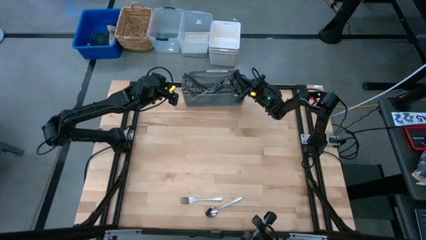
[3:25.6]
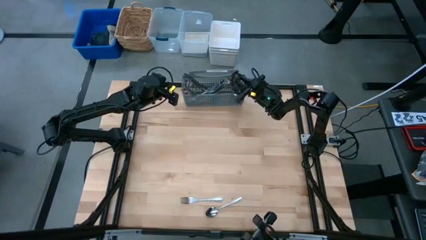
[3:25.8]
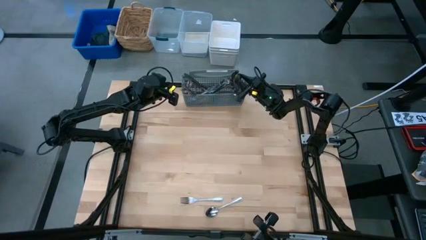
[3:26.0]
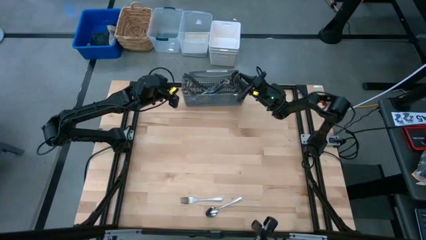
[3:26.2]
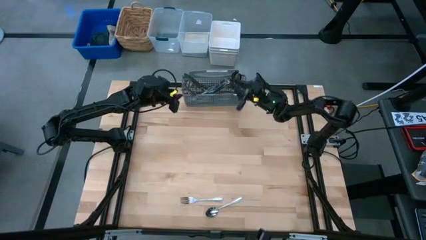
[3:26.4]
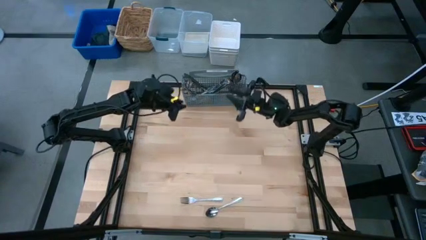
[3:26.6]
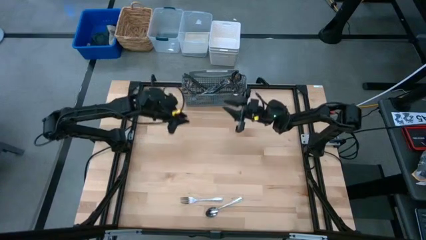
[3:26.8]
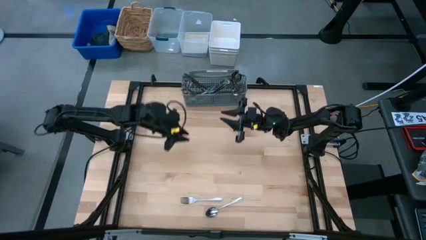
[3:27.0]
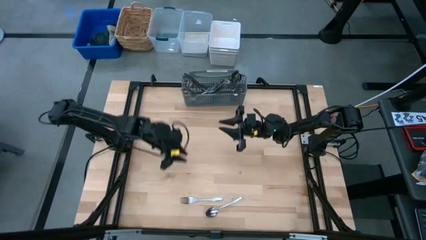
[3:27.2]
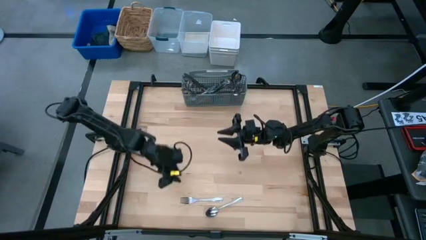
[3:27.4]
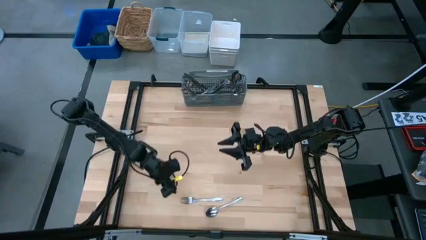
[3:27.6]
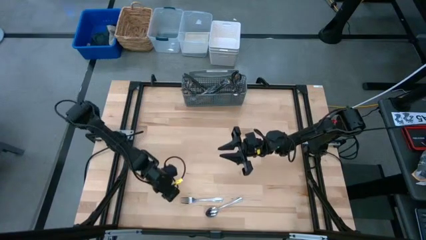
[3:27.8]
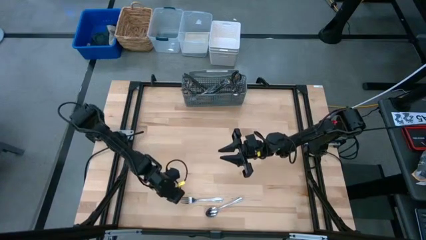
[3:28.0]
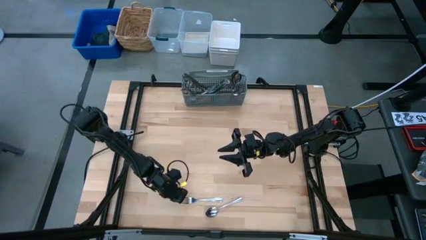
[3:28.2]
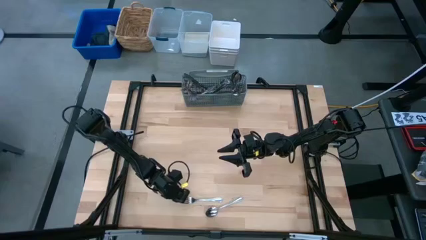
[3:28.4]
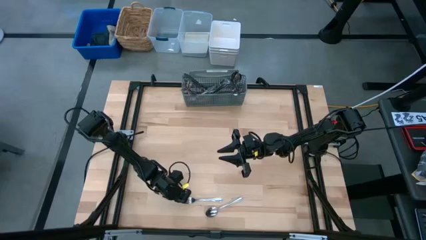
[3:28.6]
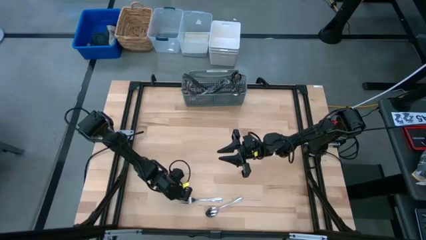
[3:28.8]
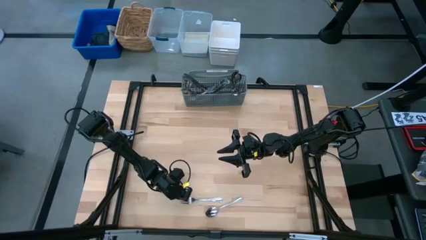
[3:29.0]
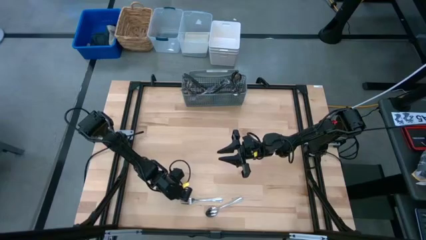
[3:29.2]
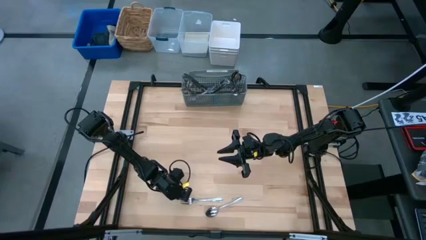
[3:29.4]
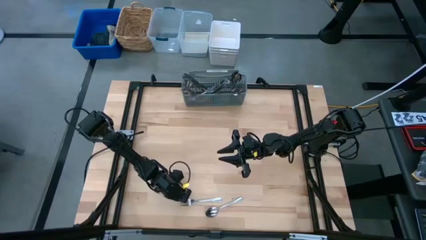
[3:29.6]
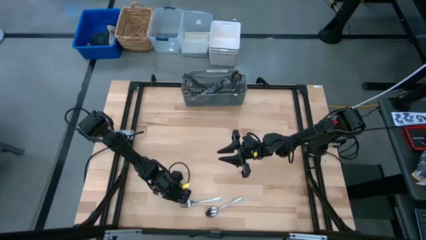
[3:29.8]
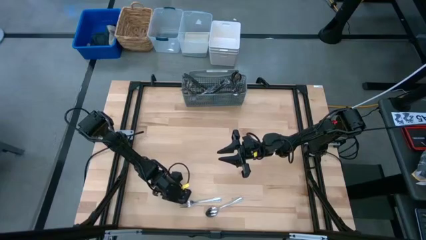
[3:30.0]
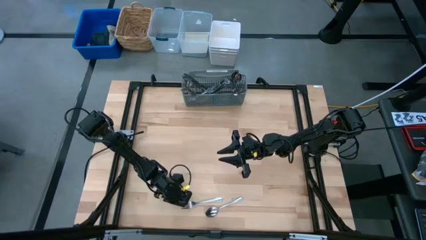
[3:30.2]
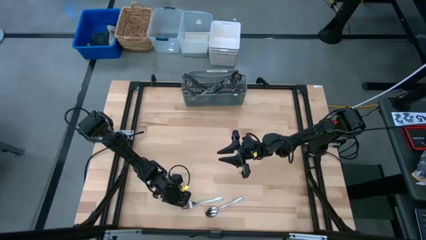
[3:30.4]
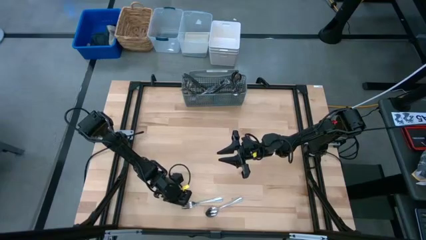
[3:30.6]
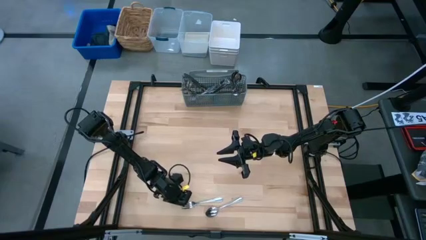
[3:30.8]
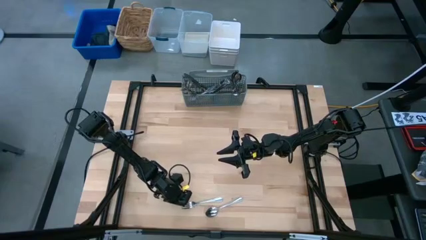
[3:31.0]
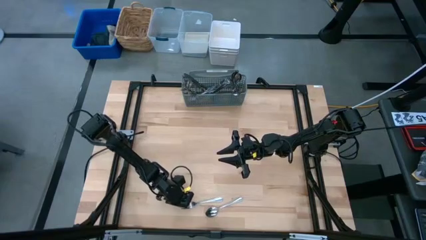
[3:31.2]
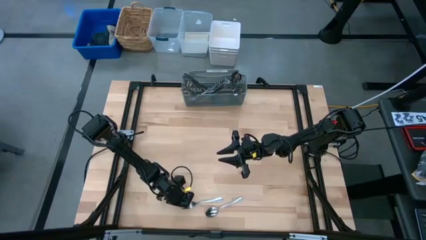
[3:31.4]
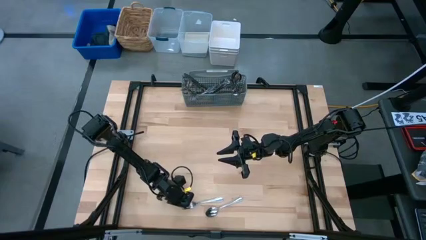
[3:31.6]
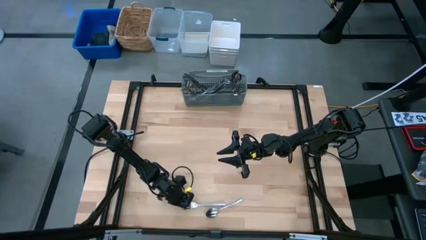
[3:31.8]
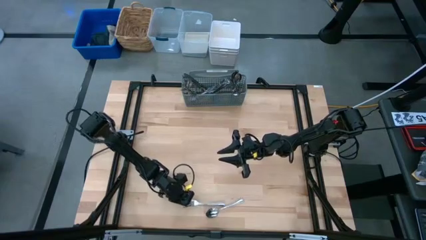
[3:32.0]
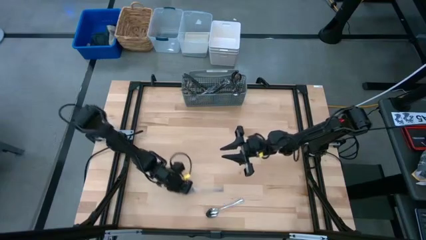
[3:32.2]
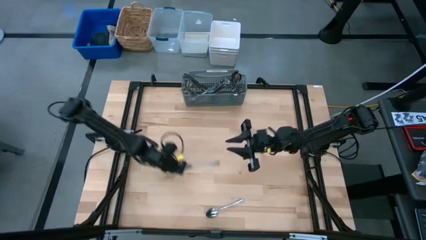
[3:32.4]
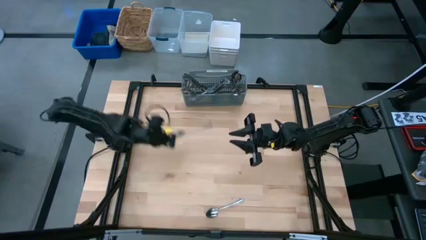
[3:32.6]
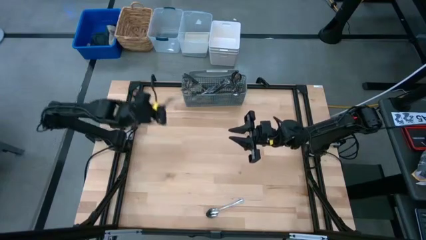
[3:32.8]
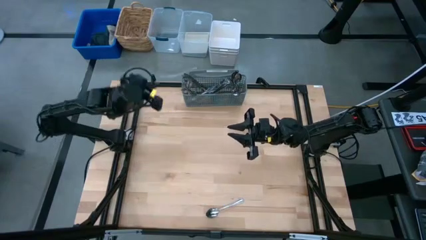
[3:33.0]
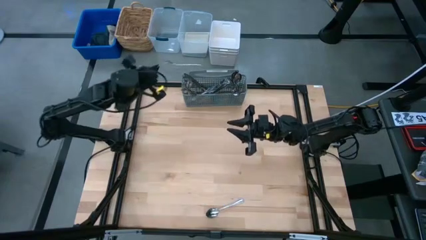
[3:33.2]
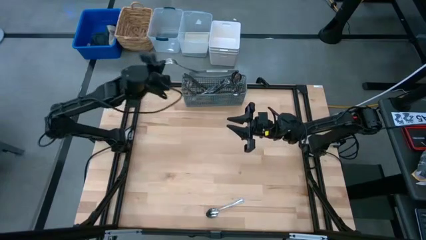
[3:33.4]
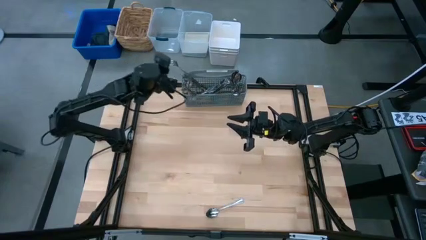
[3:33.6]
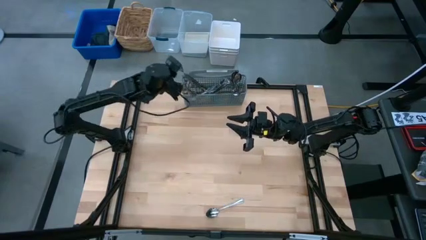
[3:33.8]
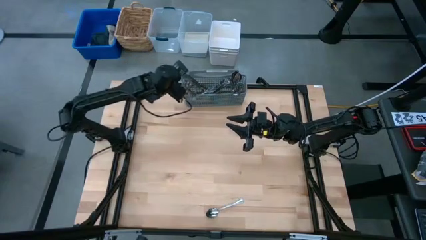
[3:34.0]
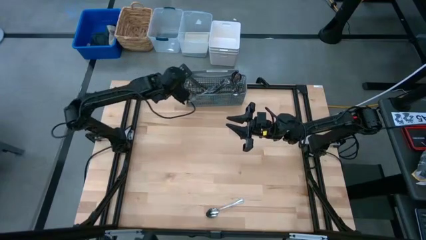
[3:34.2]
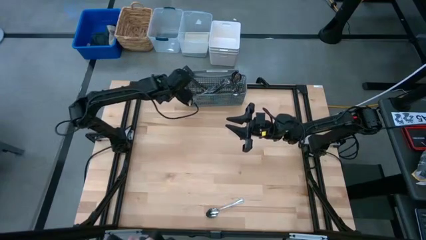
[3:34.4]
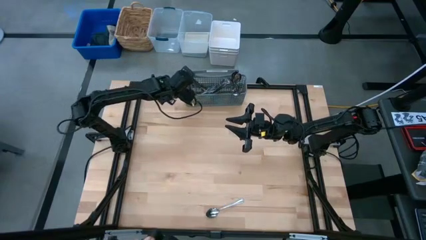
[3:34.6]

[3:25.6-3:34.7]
Put the silver fork into the dishwasher utensil holder

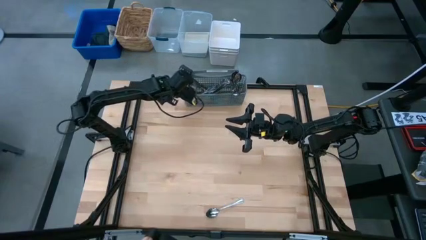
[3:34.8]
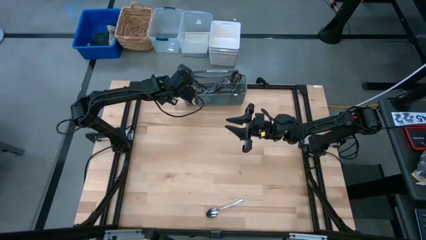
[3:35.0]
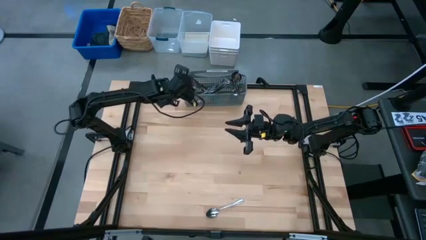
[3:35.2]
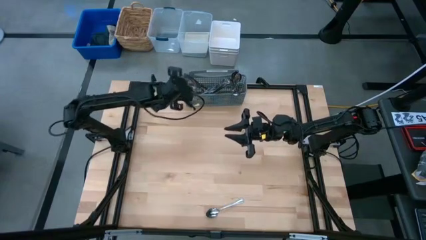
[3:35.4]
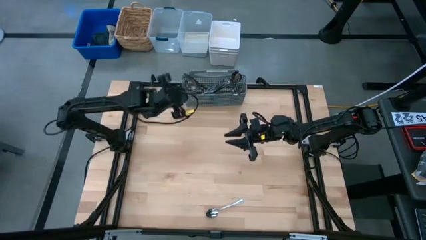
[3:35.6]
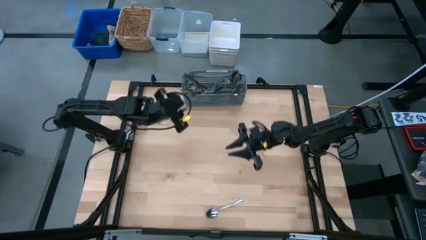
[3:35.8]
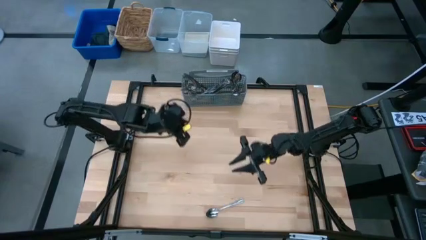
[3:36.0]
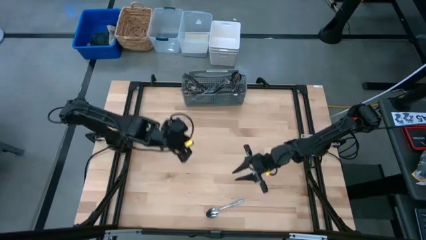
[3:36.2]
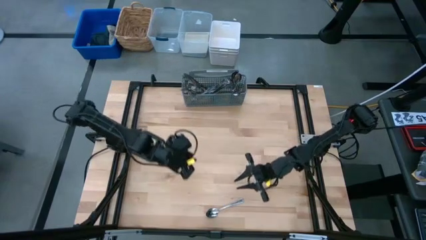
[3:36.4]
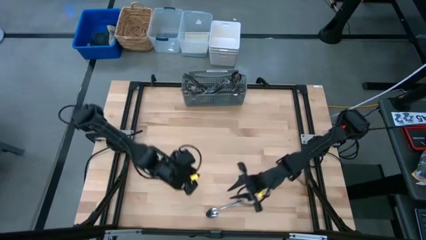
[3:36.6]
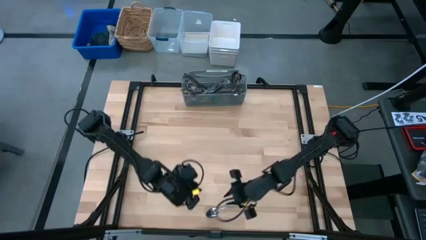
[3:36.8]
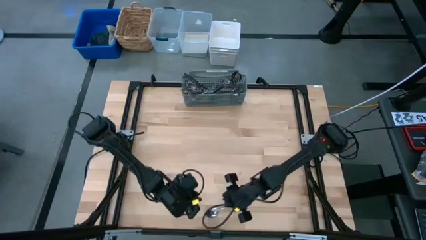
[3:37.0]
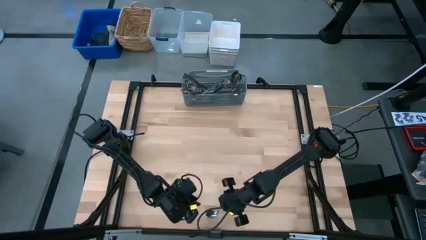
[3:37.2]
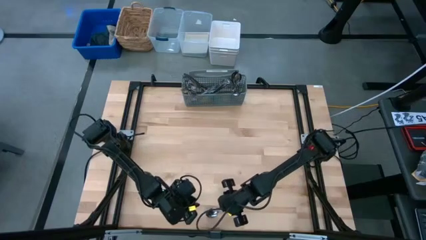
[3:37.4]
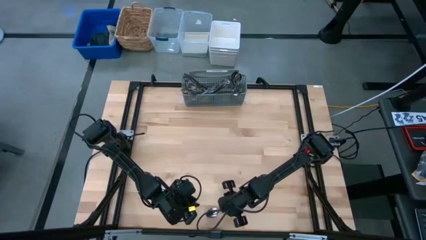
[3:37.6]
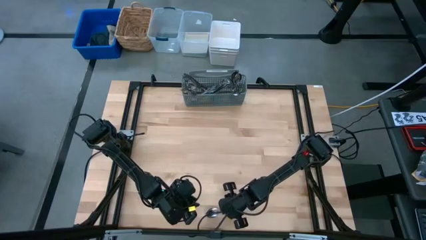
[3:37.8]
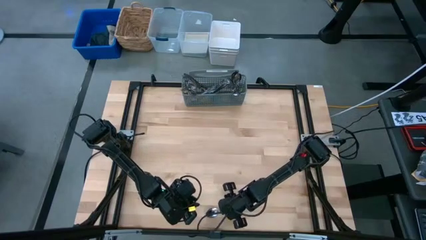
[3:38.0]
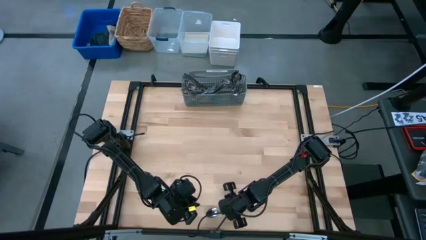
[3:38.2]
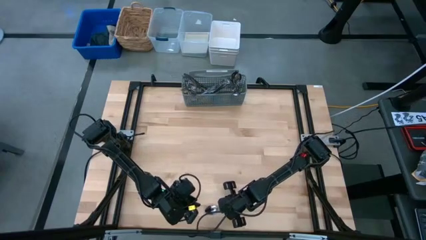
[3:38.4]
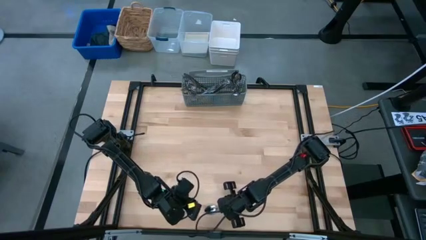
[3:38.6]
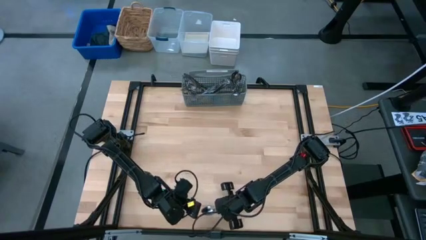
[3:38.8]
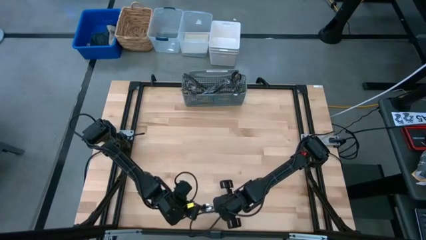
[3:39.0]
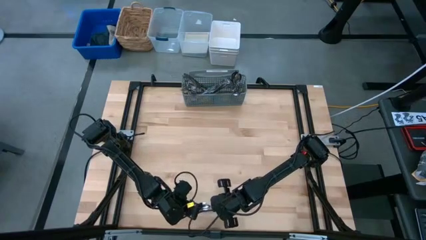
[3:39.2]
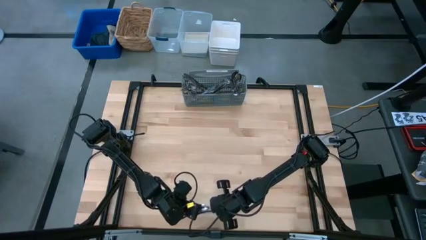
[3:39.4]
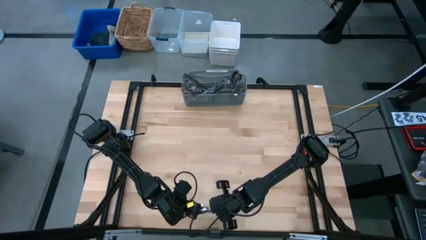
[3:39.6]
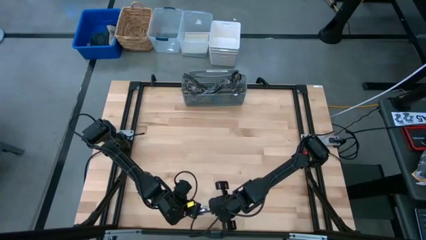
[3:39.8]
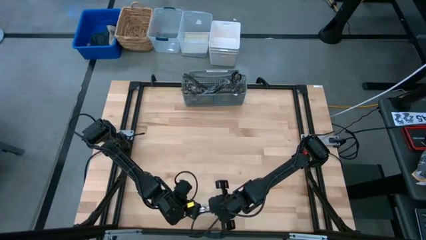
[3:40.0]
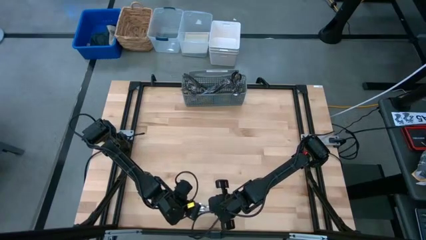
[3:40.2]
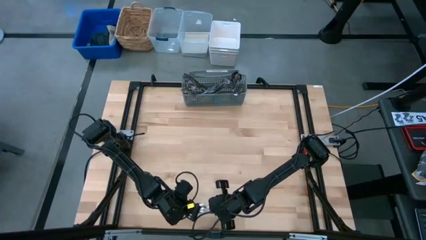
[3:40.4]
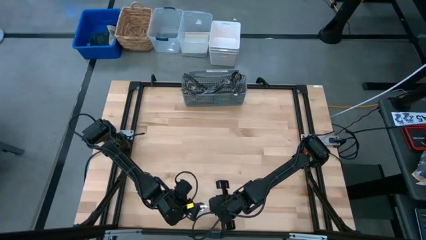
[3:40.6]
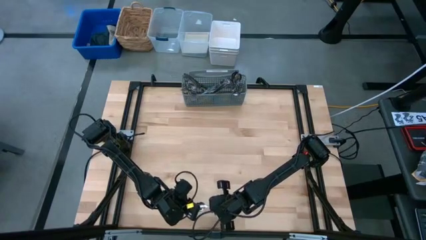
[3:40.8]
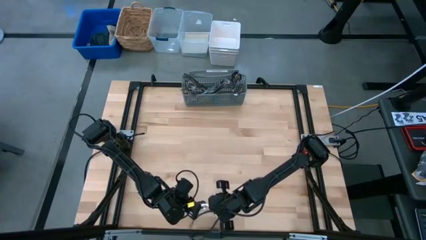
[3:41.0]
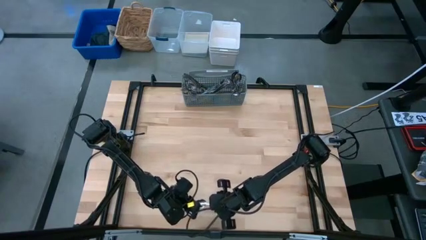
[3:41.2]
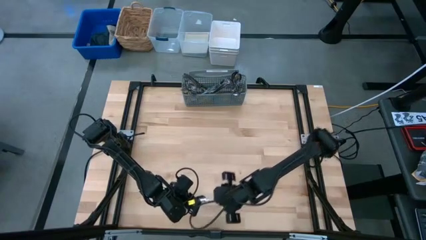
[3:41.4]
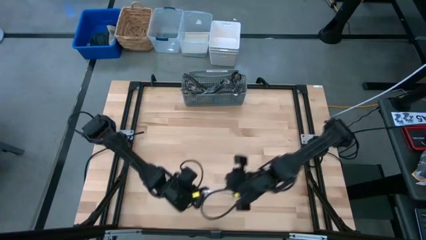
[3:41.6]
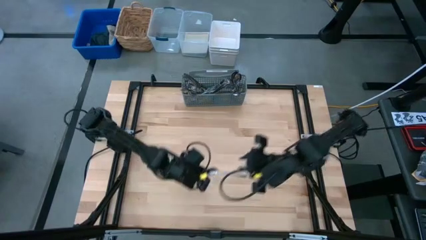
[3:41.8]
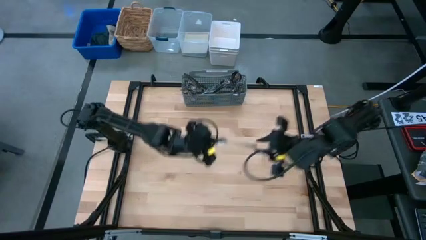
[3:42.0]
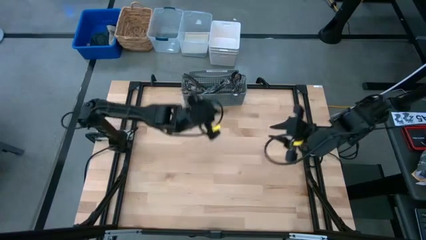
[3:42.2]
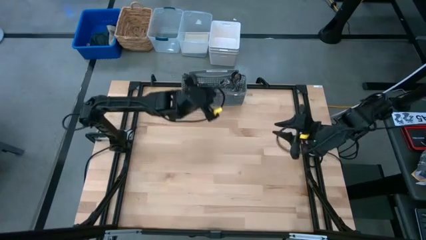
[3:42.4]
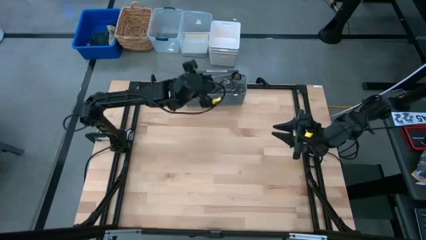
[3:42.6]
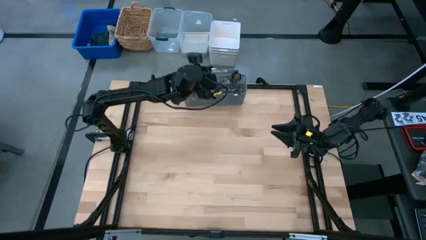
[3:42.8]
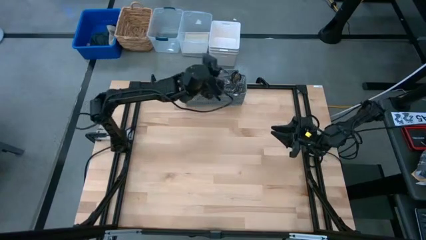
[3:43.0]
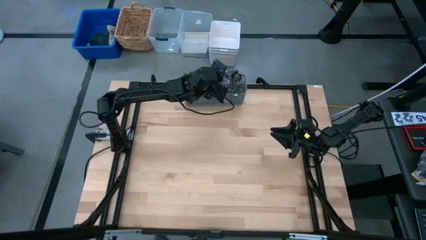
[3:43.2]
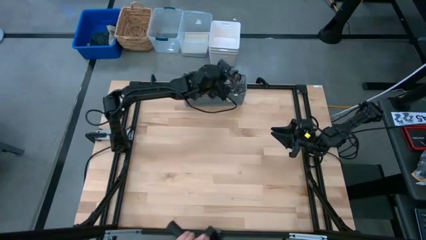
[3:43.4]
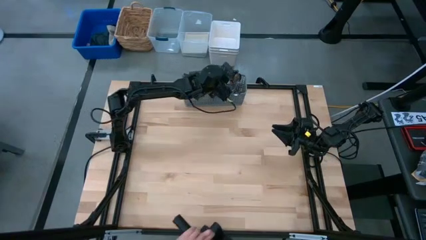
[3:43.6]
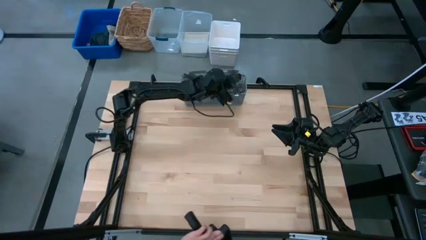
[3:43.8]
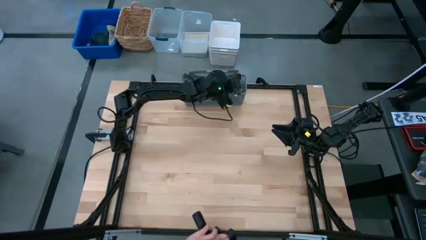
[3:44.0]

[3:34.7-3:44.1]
Put the silver spoon into the dishwasher utensil holder
